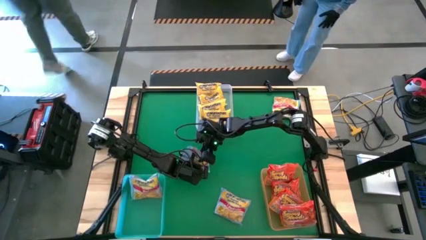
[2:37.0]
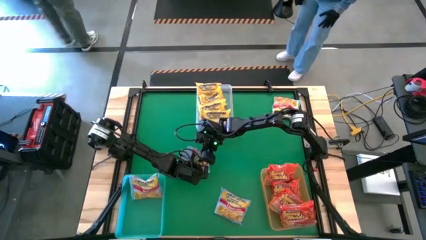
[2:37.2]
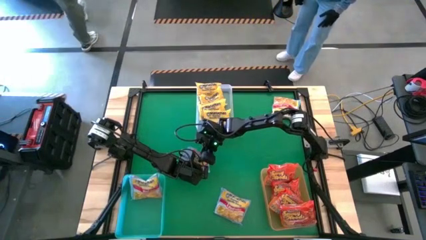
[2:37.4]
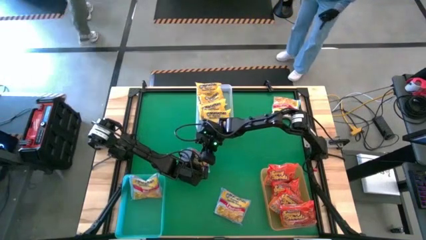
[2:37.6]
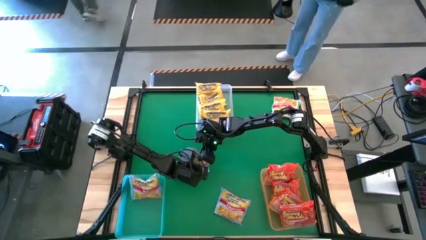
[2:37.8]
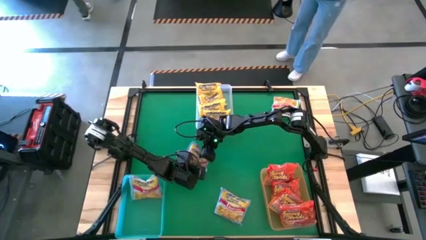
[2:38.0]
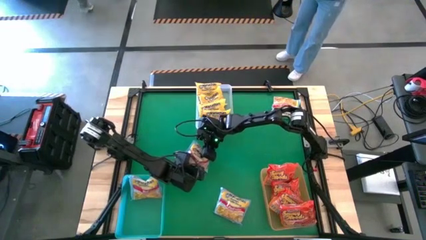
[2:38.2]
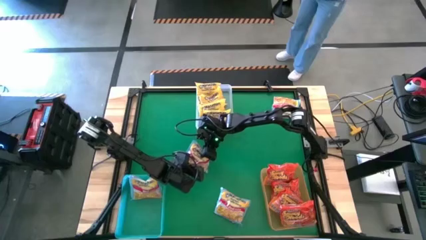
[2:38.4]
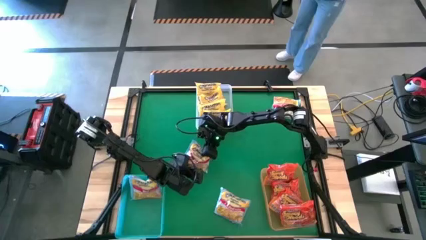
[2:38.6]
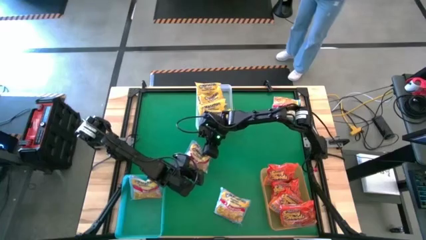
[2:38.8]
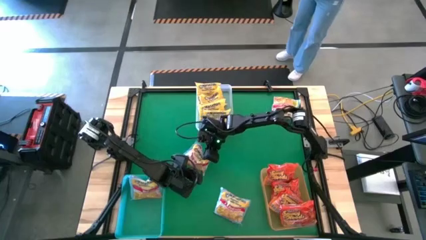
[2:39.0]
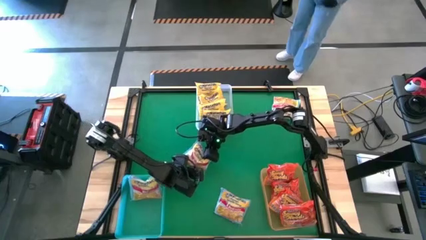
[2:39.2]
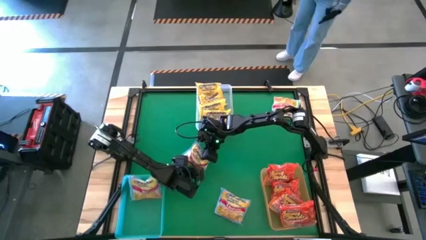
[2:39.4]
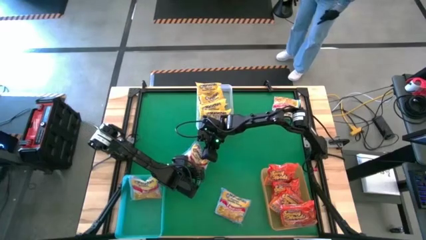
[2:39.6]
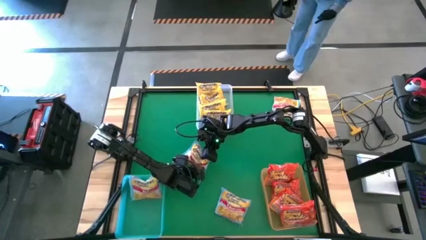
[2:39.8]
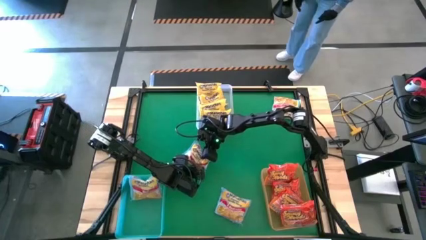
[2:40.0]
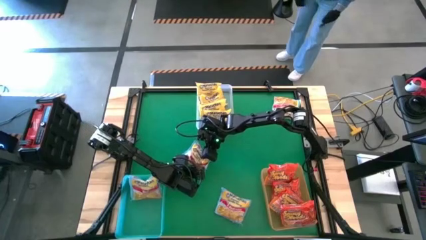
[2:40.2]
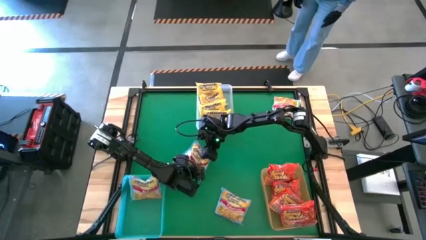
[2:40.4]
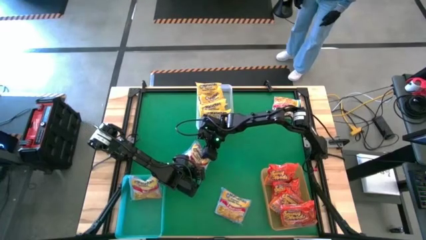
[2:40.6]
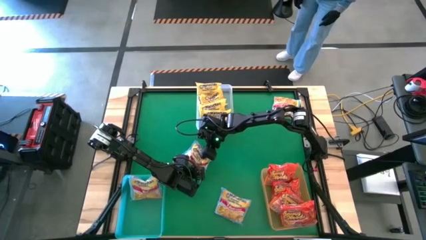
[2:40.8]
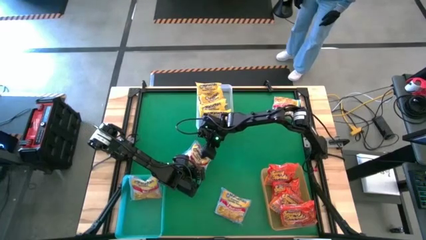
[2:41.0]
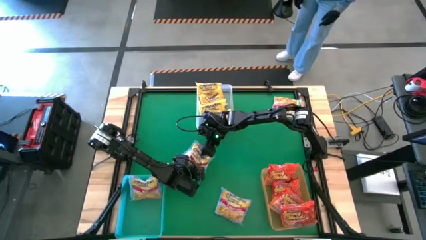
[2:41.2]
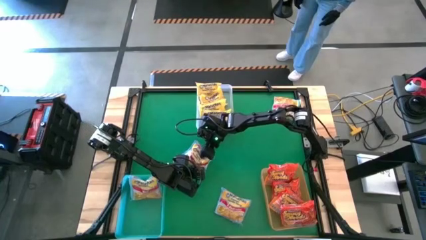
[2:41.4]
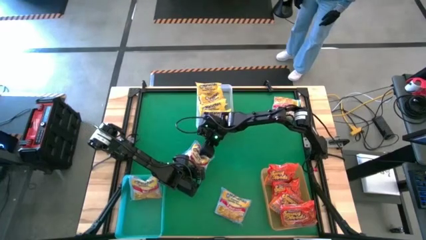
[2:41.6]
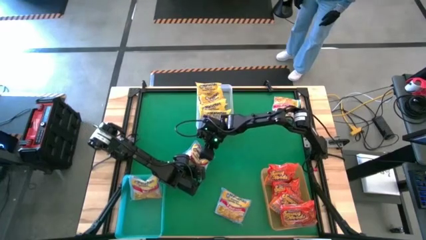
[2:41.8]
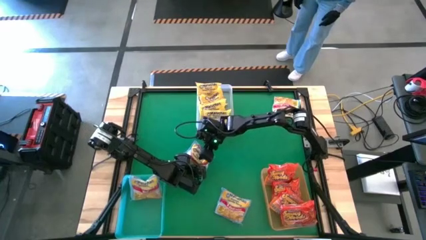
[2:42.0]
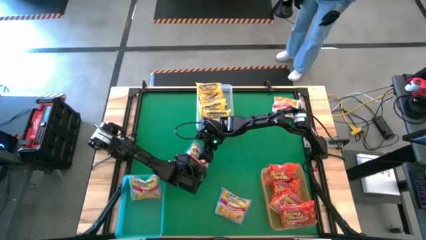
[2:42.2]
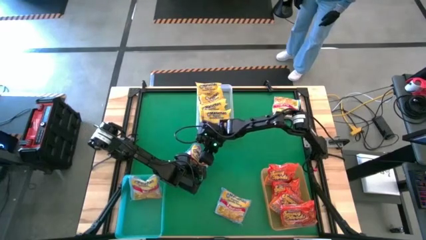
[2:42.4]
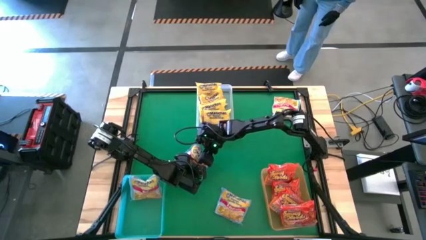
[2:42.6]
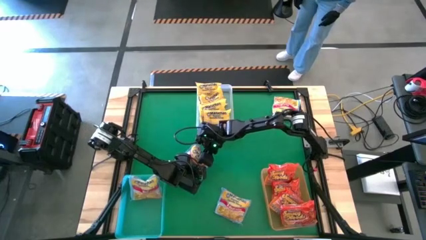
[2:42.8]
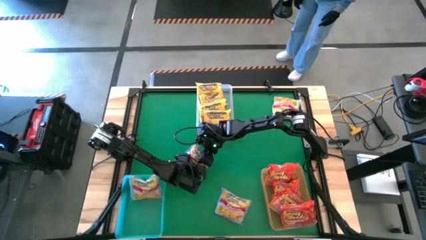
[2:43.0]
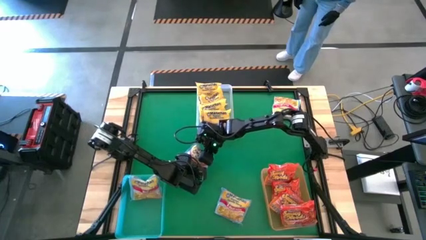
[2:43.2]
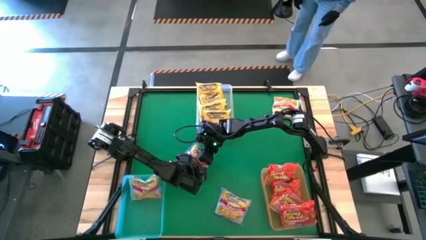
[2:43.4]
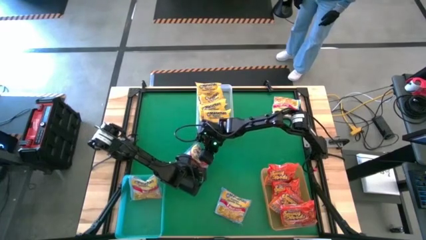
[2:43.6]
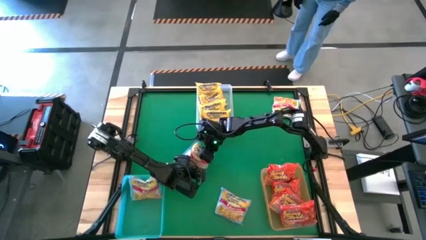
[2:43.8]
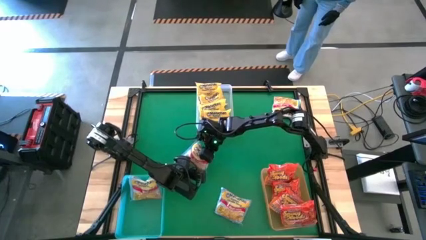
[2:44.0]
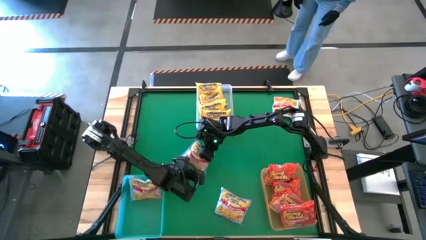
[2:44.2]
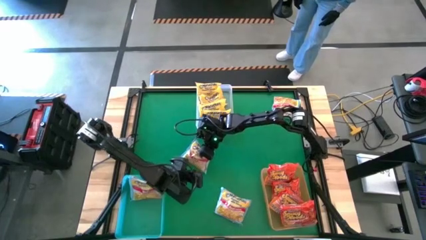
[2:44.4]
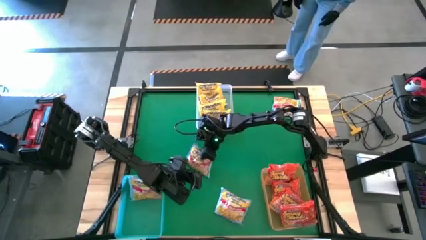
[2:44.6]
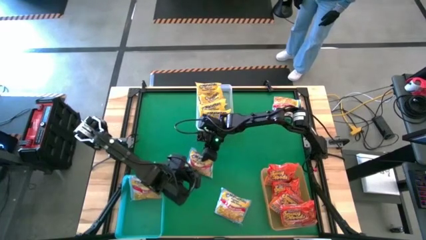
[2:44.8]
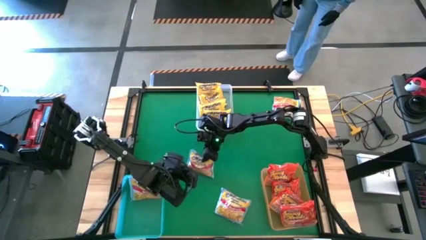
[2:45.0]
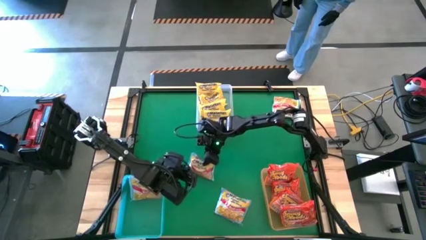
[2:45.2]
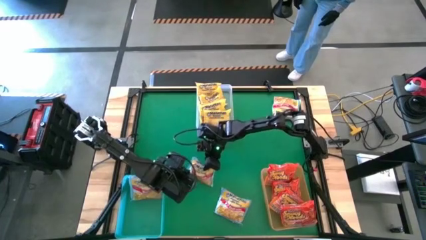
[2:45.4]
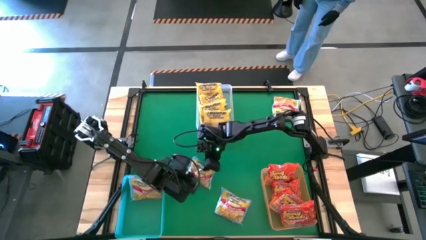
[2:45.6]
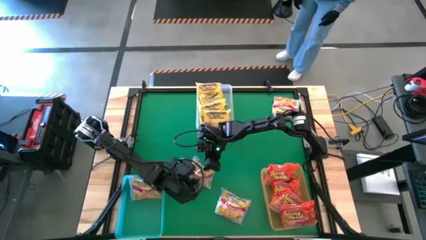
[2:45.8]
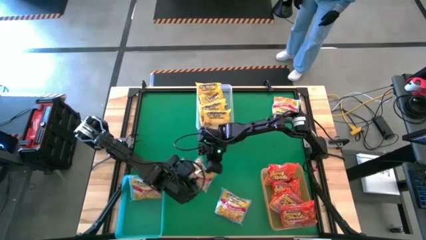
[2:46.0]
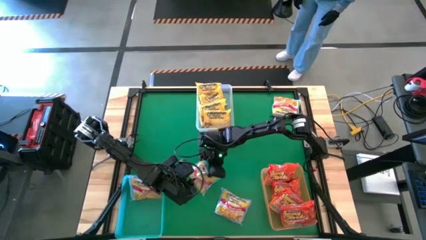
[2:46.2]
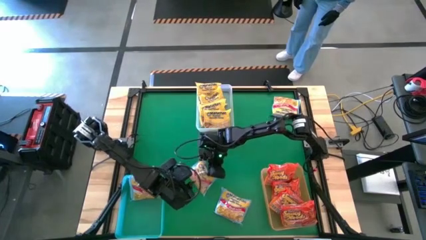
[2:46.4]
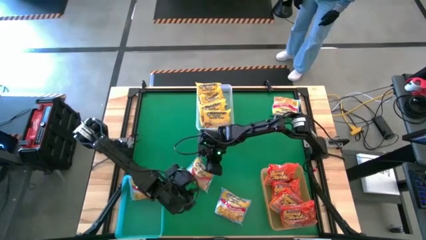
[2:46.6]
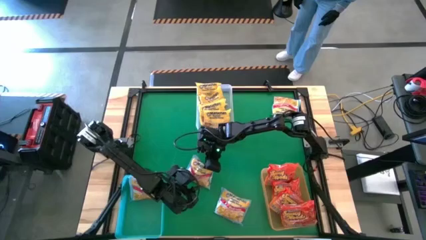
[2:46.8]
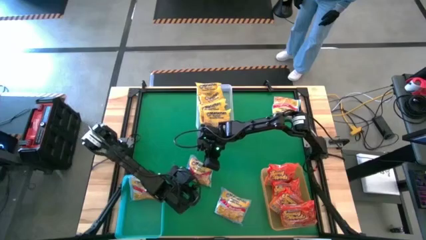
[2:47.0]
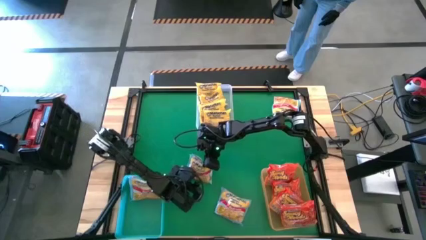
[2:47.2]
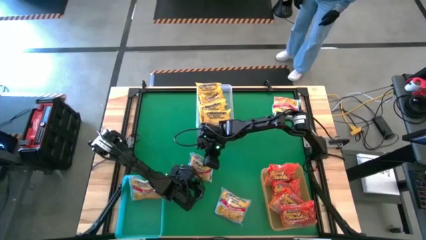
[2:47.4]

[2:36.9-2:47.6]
Task: Sort Maruchan noodles
Put the top left blue noodle pack into the blue bin

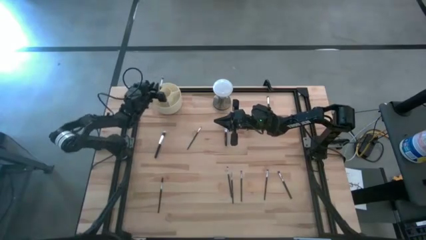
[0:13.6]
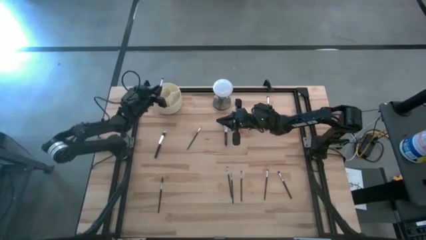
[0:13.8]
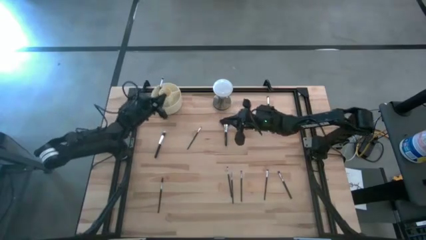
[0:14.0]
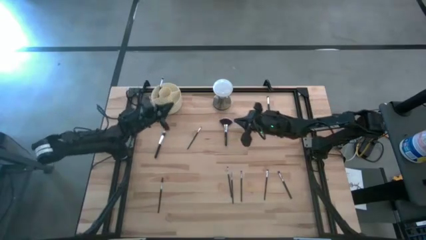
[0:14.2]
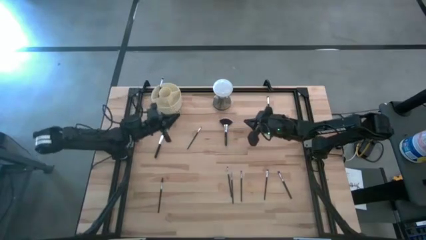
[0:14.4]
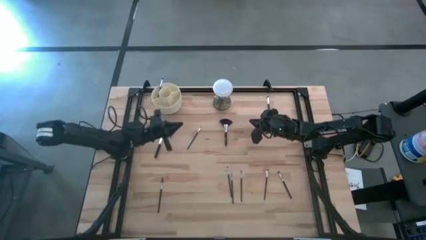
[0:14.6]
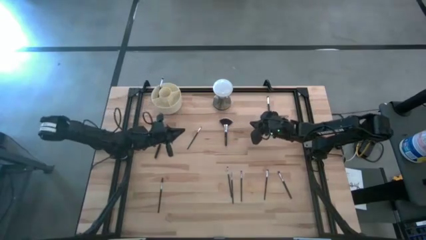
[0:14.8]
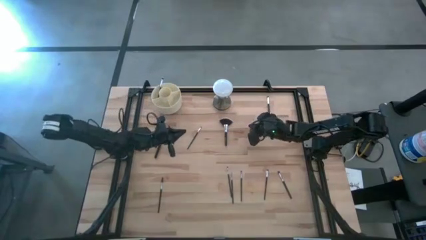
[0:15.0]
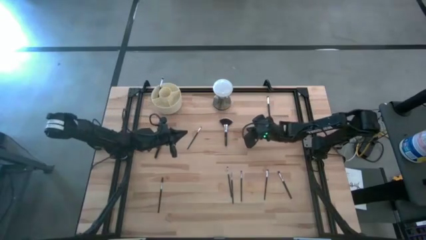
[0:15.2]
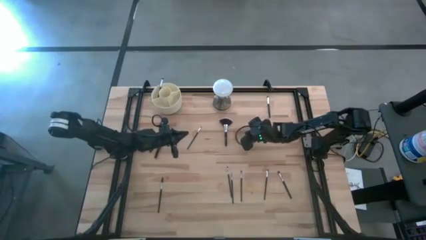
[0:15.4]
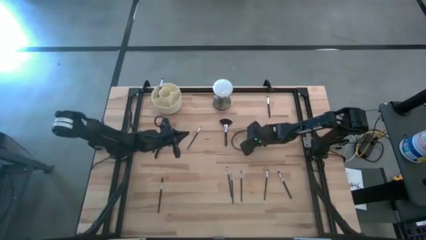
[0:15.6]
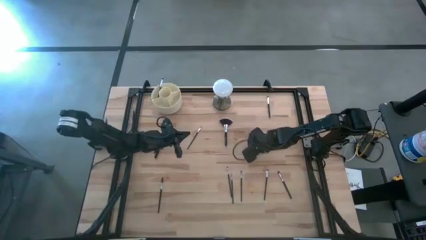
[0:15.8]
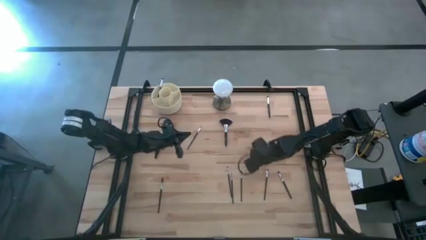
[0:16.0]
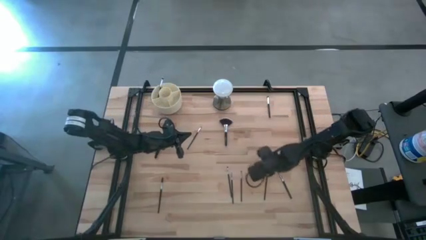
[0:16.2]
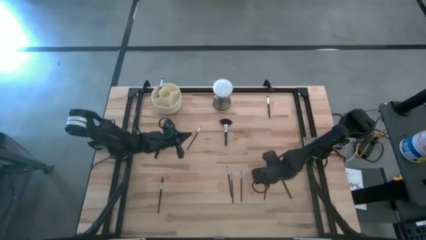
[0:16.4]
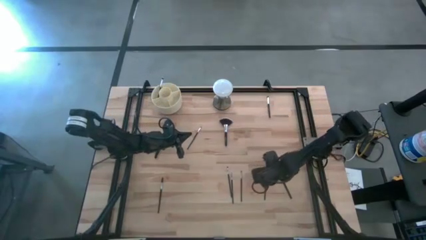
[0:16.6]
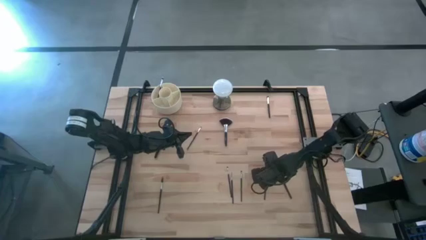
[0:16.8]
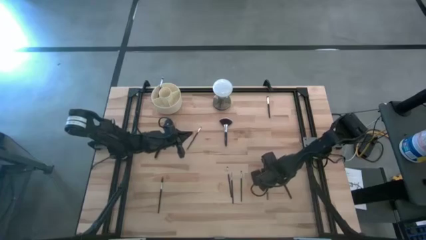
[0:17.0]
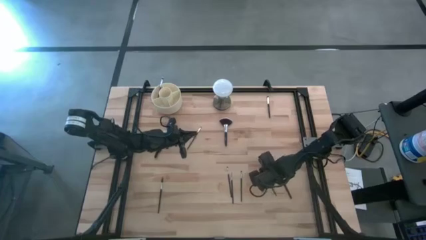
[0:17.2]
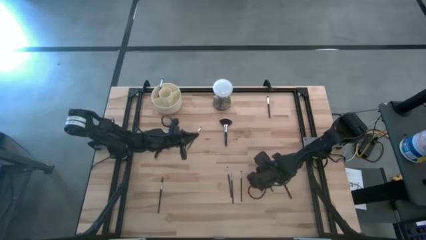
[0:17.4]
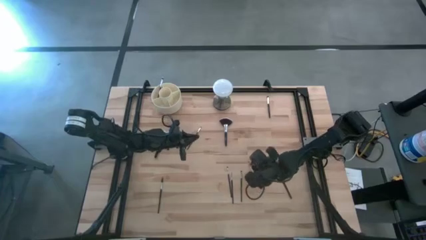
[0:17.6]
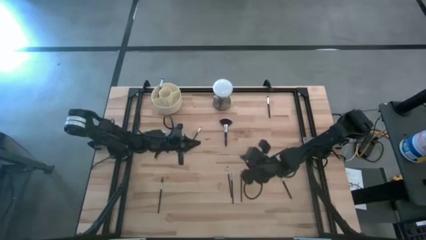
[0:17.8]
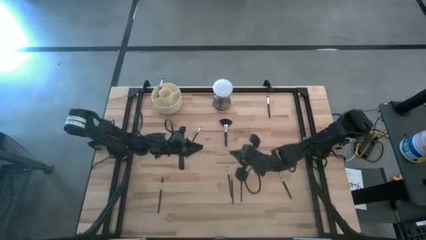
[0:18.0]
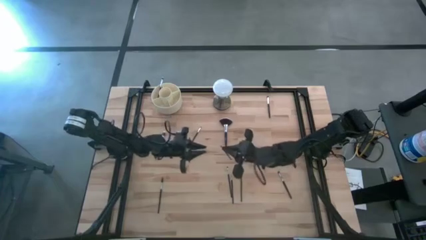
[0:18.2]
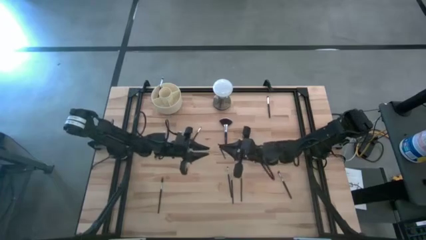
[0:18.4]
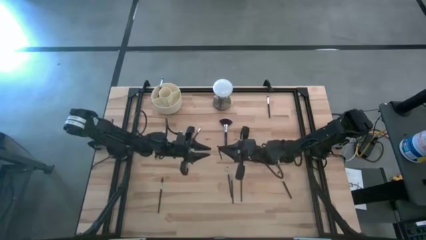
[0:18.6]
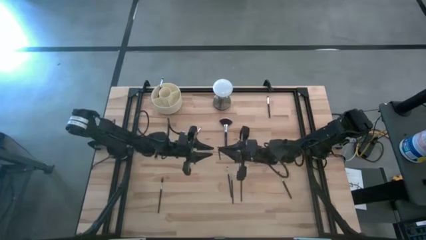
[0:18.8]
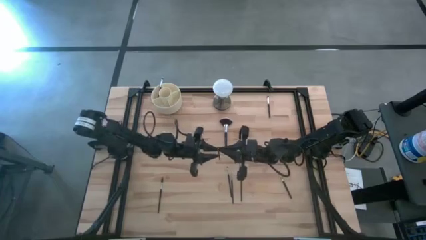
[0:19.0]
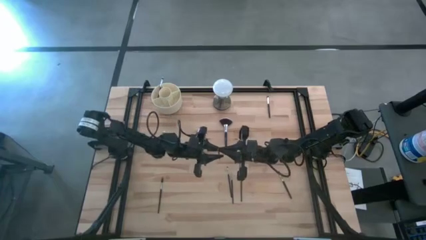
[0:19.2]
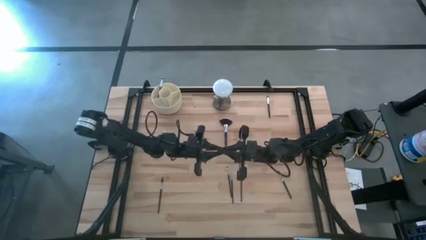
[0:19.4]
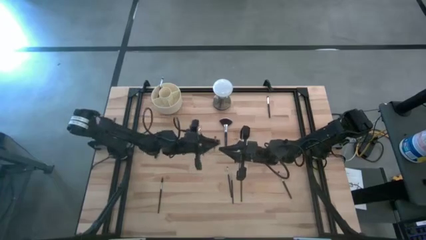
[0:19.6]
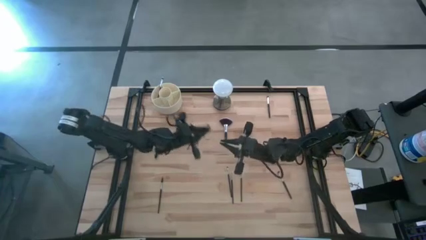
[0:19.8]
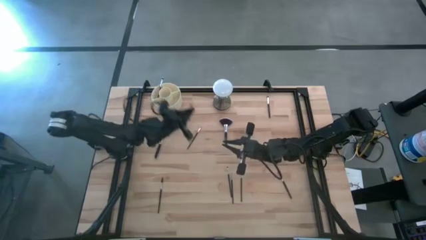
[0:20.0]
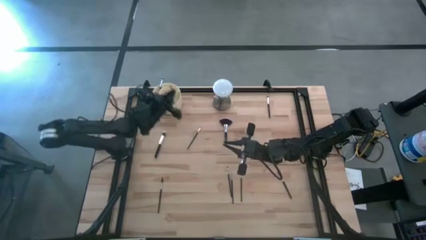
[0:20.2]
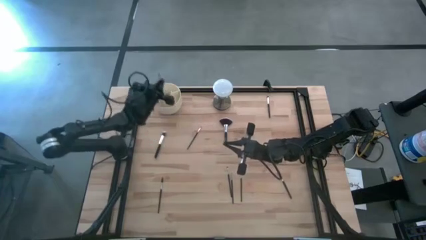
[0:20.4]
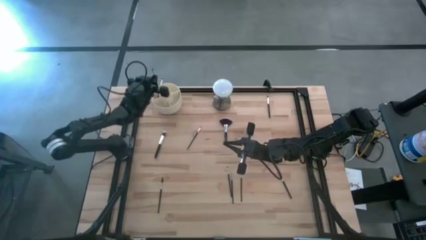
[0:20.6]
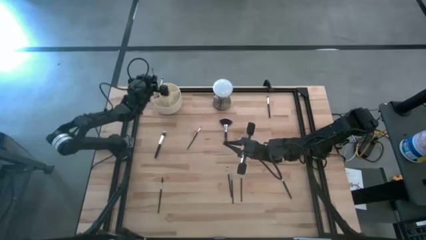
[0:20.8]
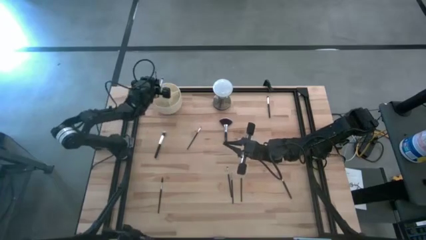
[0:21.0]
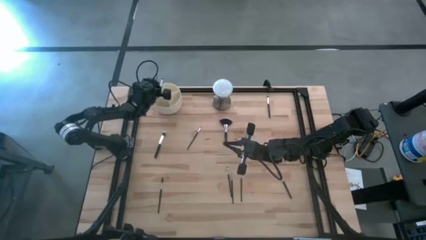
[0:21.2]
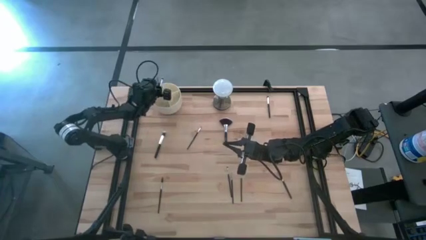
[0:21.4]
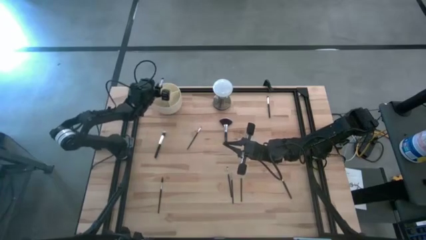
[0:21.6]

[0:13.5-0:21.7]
Task: Put items in baskets/containers
Put the eyeshadow brush into the organizer
